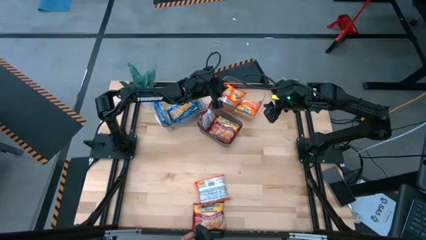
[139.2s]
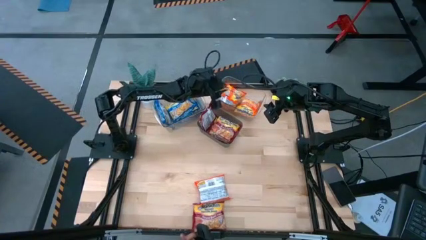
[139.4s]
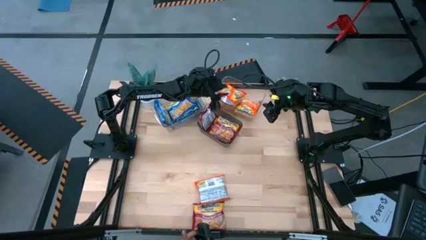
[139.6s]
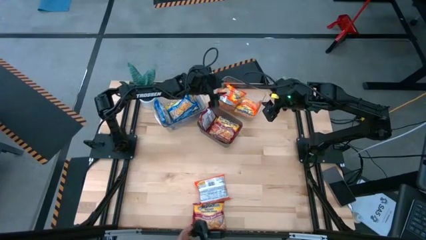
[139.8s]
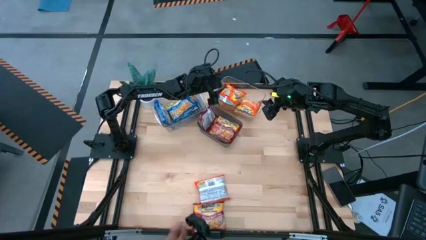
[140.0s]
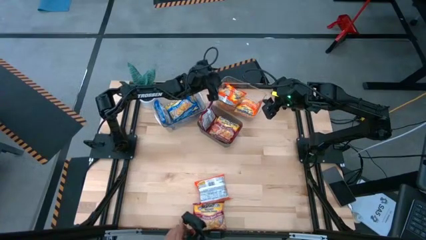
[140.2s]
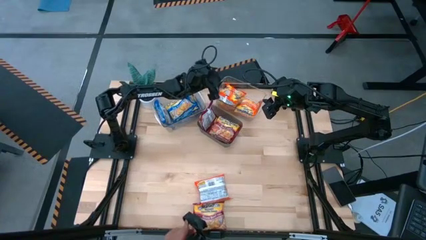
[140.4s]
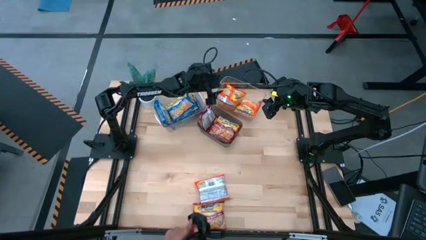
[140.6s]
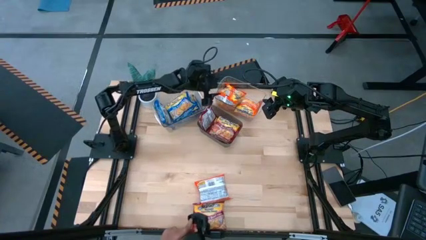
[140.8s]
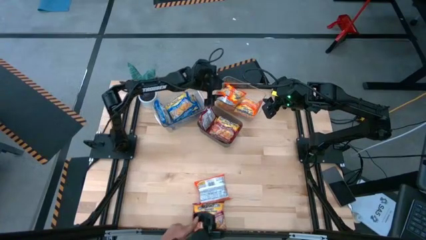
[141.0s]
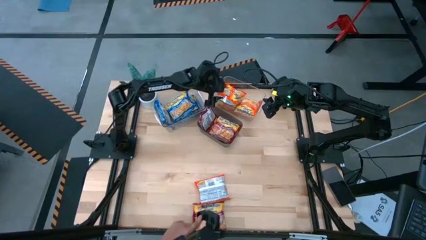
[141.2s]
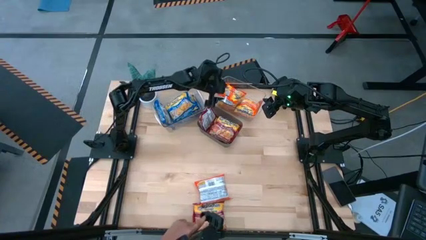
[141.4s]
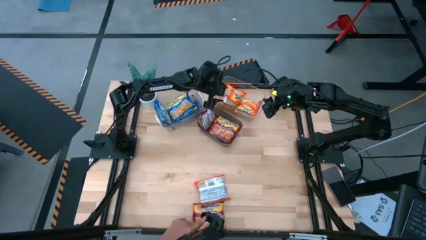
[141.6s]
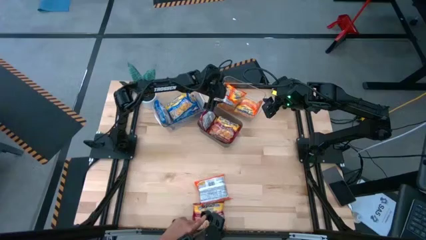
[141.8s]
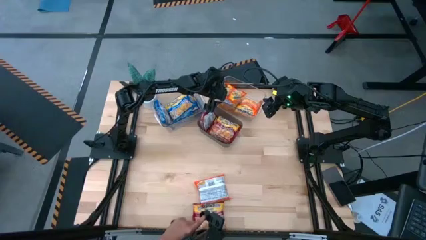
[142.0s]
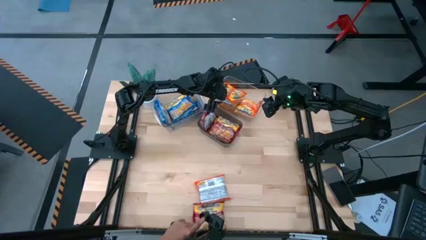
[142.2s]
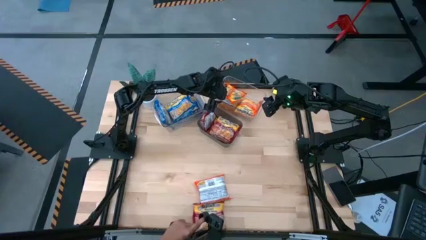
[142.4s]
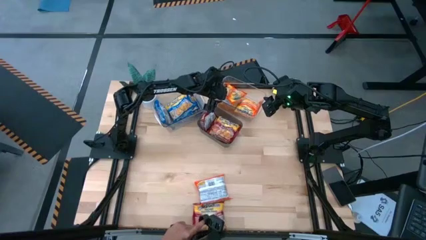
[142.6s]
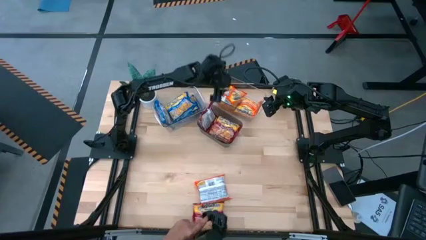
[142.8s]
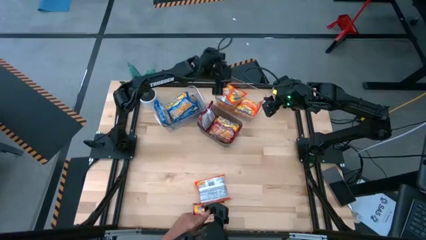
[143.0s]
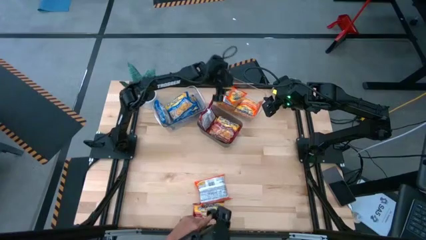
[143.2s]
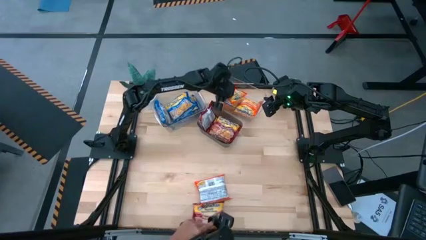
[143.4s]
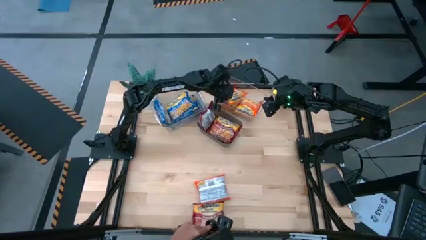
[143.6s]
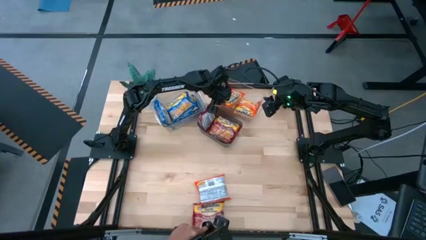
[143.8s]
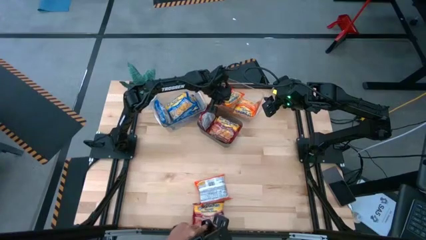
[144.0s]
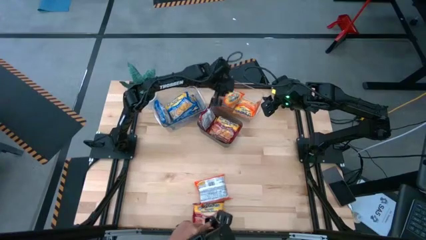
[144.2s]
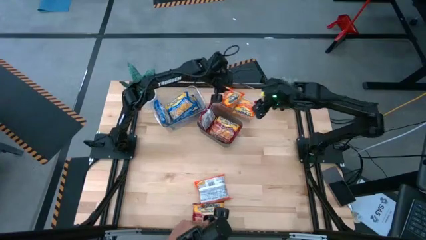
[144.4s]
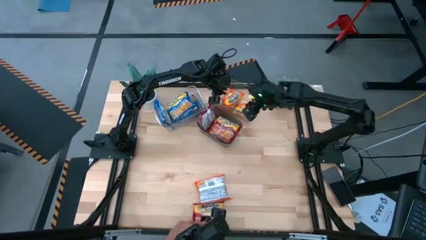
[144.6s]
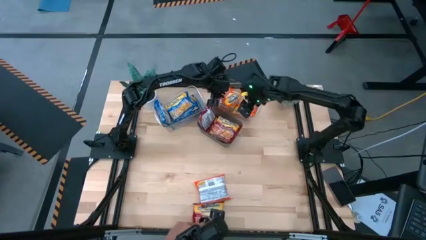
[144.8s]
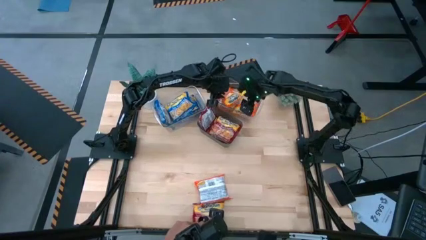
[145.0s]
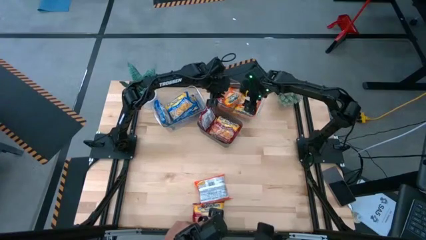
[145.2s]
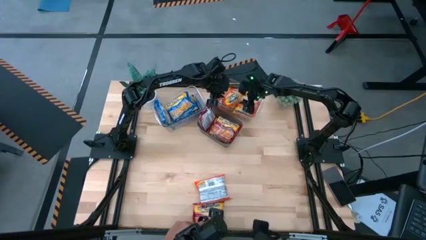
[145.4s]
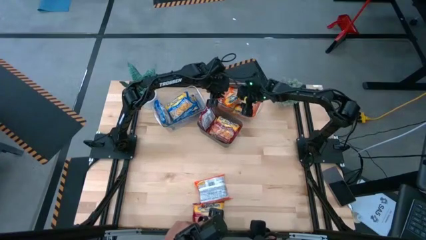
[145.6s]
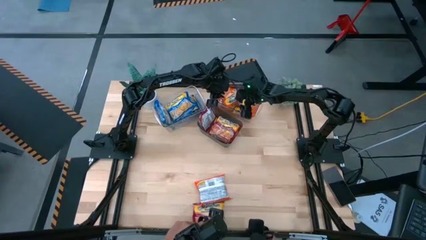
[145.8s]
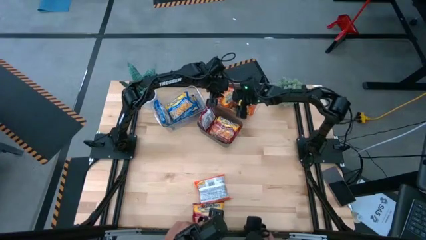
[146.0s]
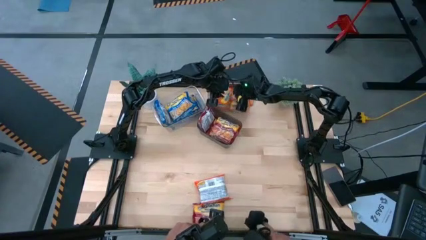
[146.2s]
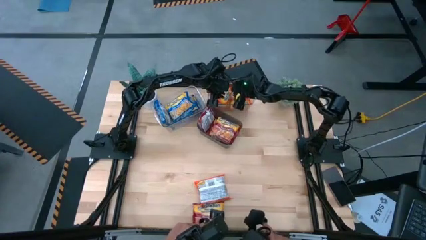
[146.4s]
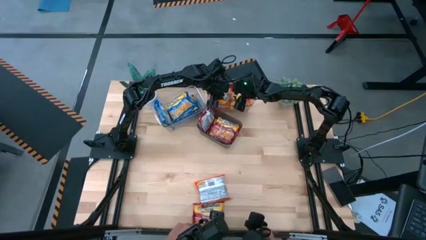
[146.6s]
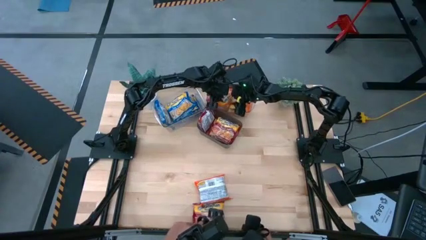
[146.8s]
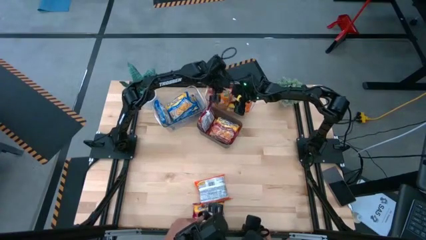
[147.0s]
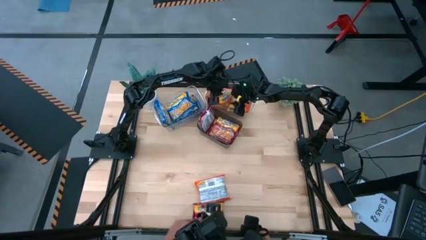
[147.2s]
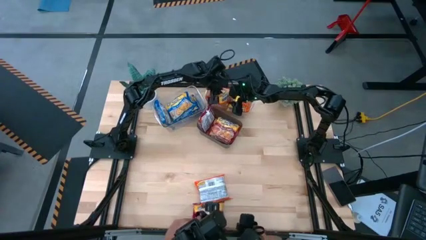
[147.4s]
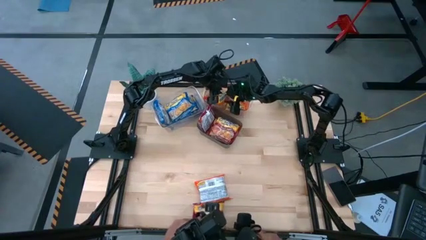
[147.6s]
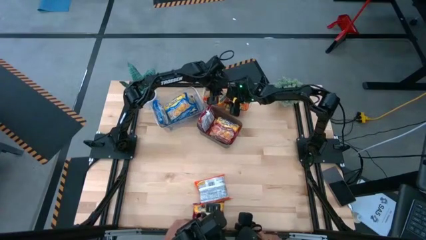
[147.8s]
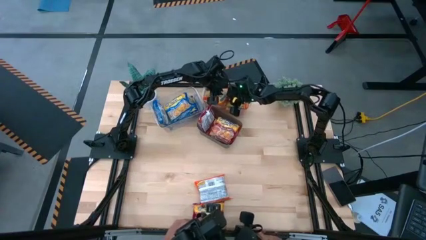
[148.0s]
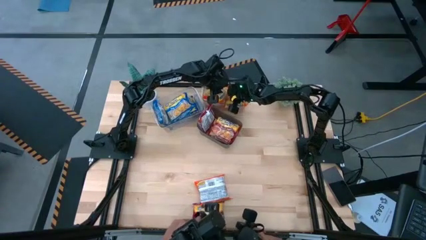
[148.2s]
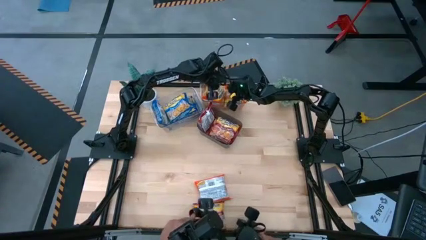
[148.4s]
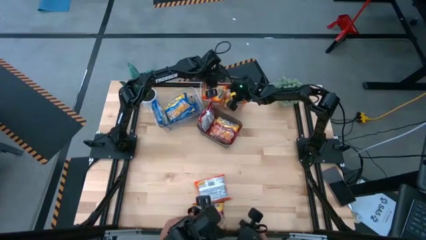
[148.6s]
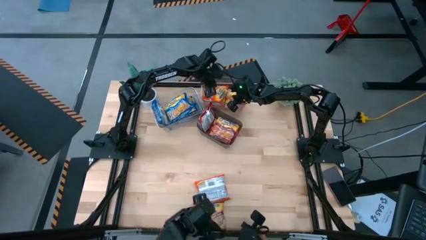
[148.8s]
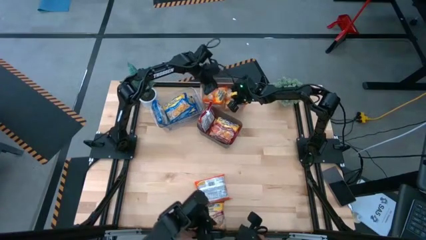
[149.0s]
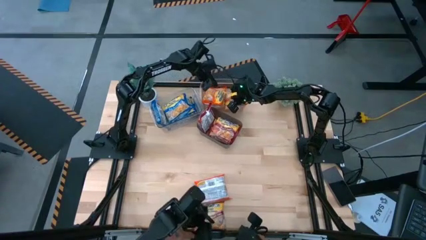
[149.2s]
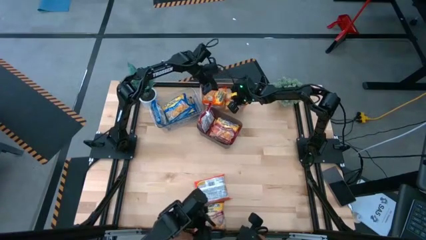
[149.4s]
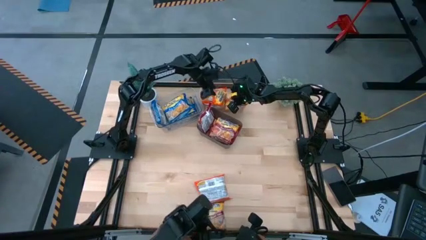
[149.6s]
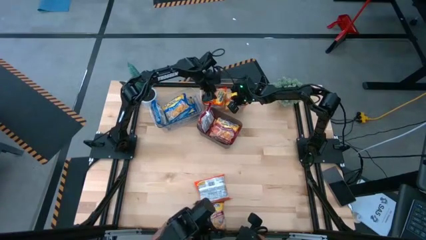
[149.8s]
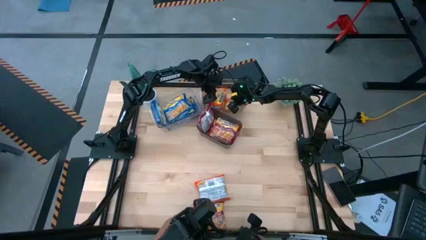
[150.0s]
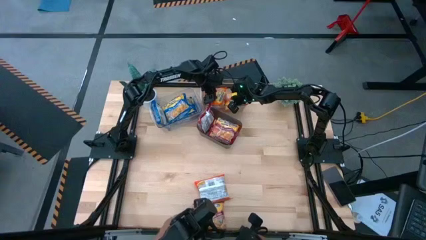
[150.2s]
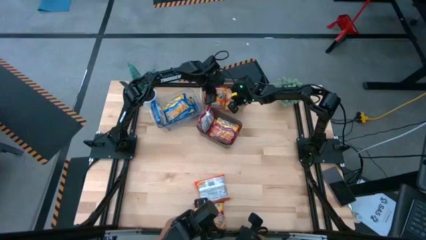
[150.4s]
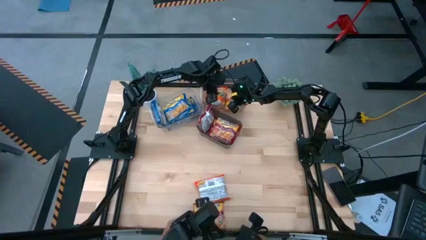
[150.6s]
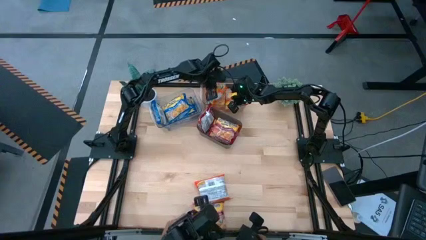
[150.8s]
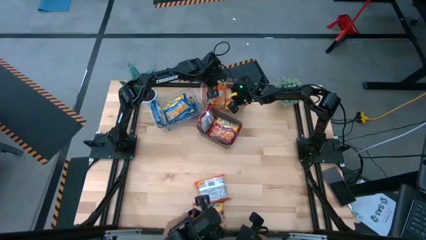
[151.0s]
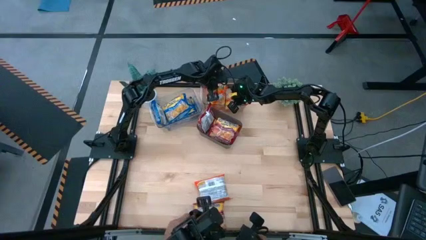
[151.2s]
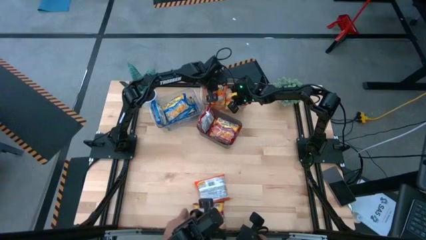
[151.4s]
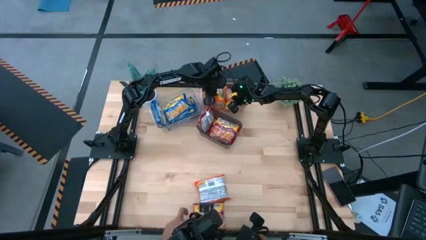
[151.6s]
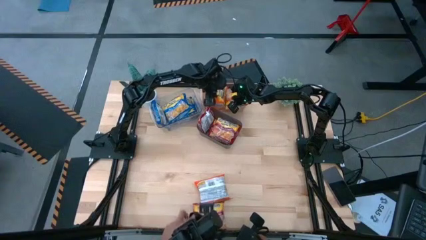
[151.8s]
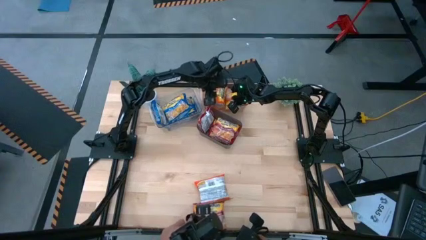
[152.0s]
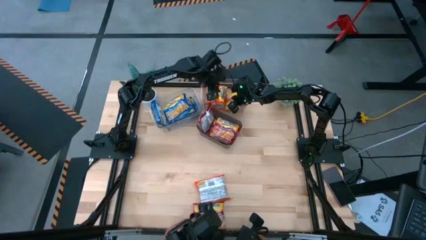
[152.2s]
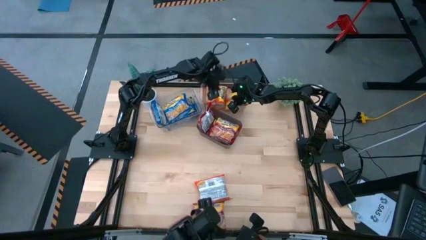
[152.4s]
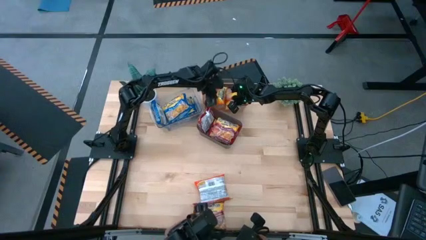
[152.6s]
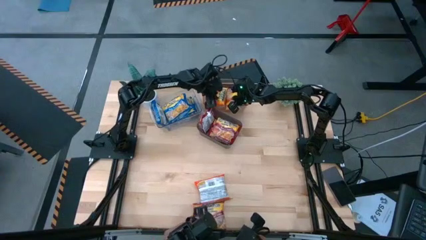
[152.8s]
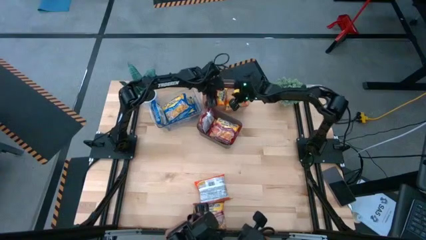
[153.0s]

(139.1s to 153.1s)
Task: Sort Maruchan noodles
Stack the orange noodle pack on top of the orange noodle pack

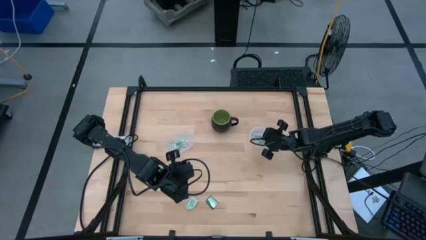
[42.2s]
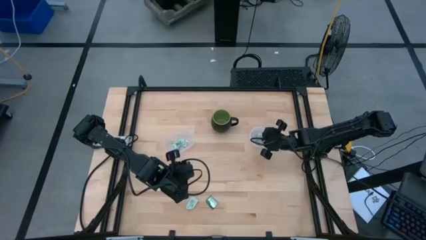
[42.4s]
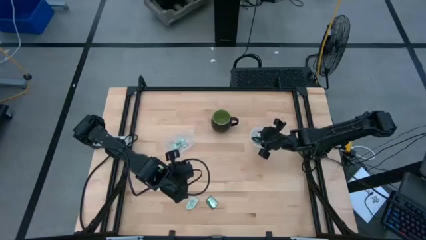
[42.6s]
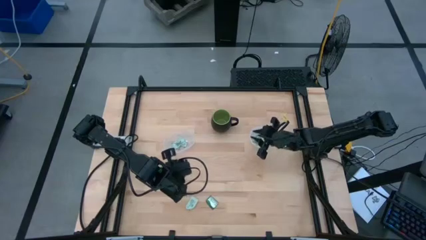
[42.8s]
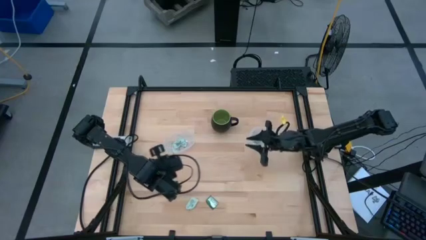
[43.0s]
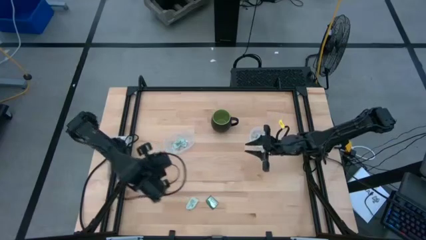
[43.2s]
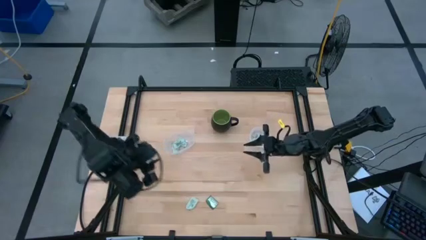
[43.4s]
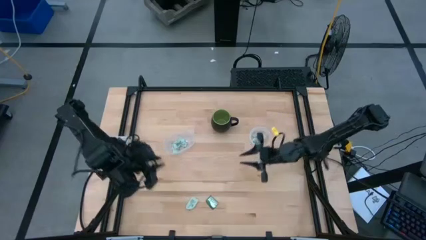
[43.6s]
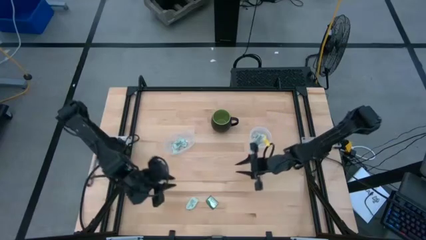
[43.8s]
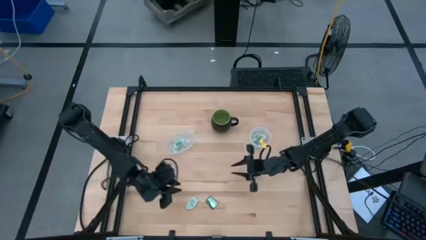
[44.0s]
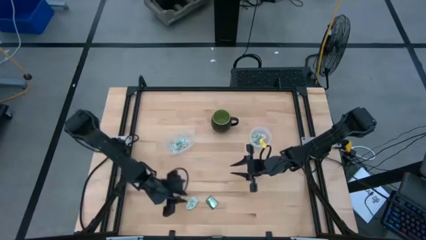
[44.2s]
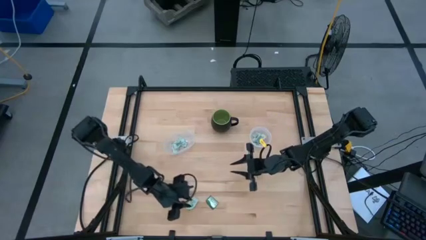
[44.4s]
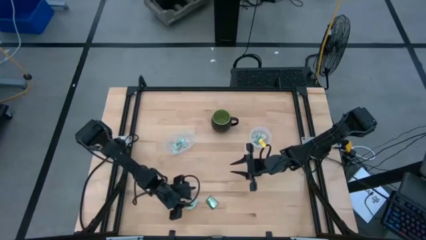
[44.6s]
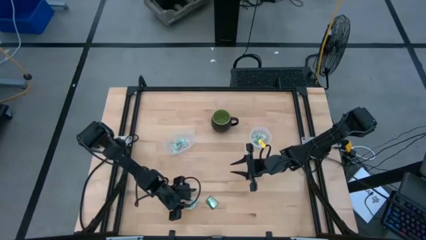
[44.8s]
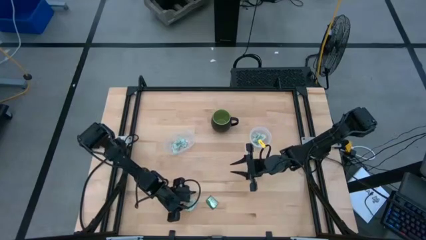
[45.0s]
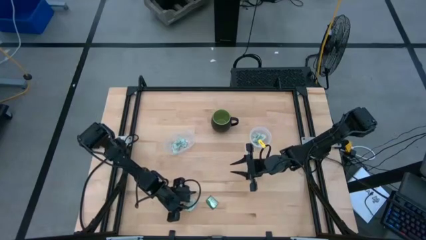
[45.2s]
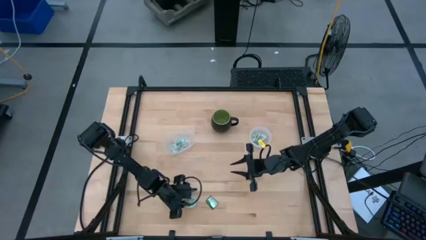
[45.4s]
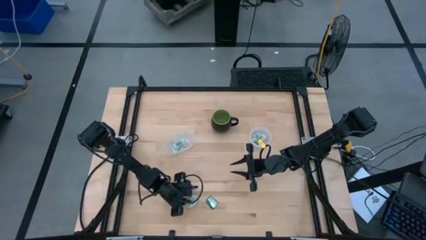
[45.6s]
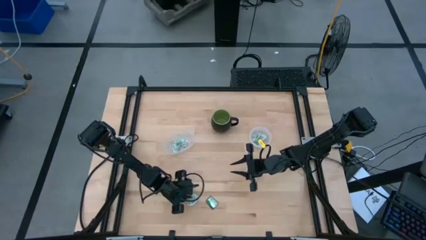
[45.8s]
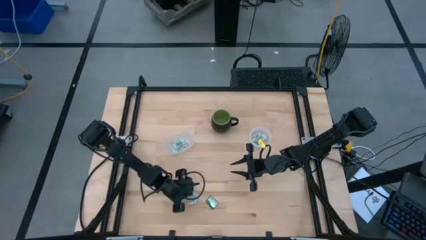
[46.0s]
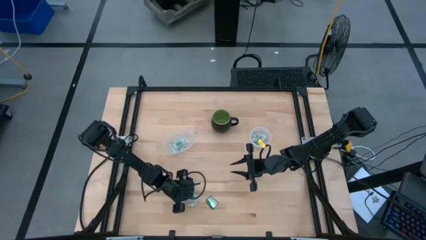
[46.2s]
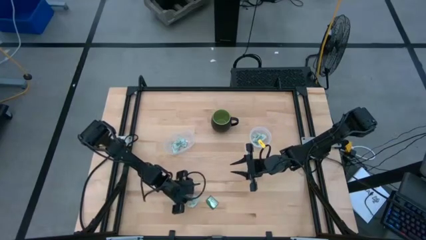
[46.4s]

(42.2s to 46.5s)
Task: Pick and place Stevia / Truvia into bins
Put the green stevia packet into the left transparent container
